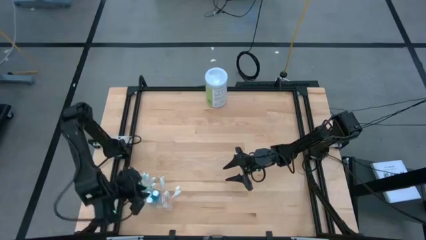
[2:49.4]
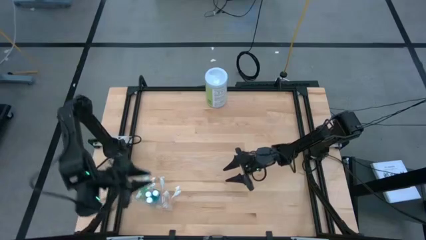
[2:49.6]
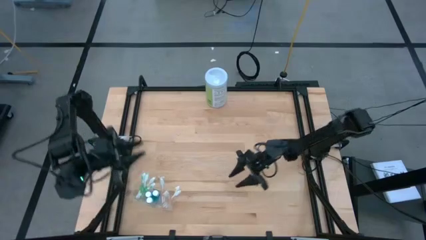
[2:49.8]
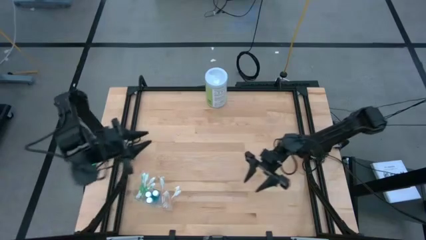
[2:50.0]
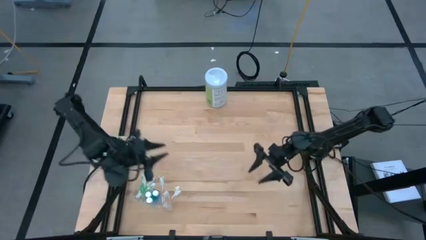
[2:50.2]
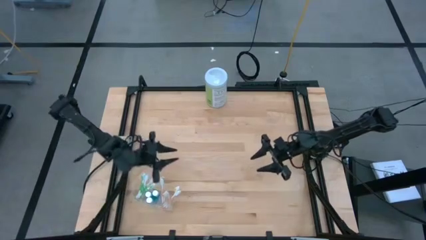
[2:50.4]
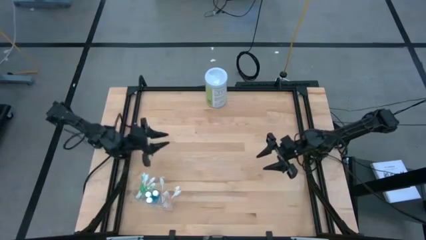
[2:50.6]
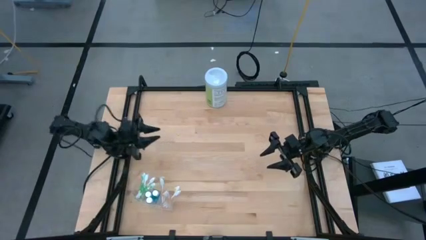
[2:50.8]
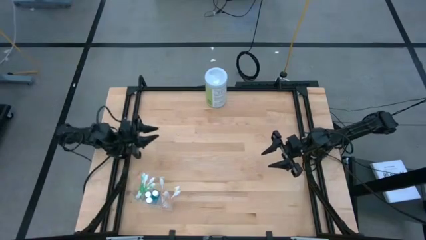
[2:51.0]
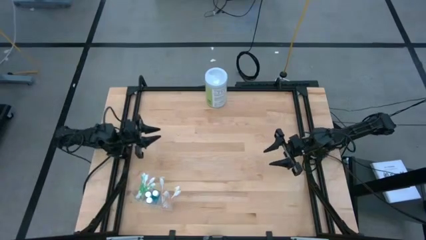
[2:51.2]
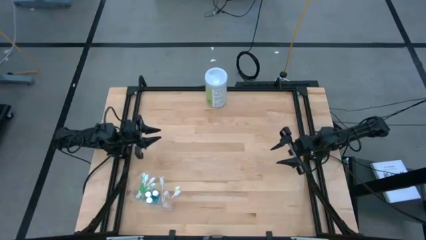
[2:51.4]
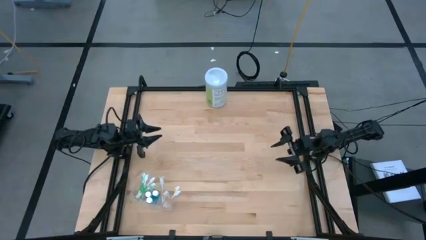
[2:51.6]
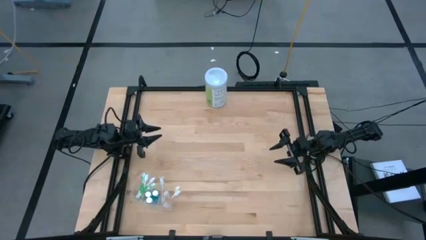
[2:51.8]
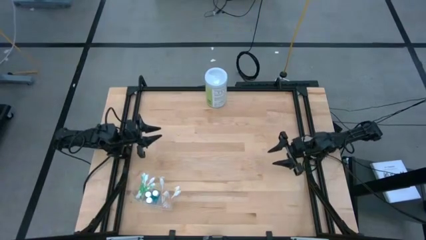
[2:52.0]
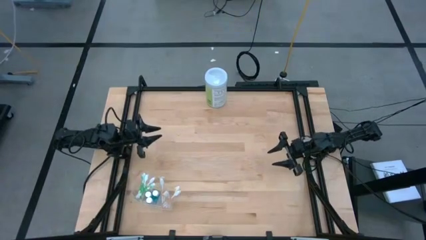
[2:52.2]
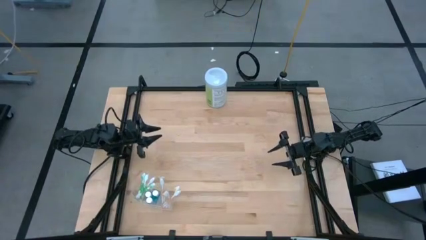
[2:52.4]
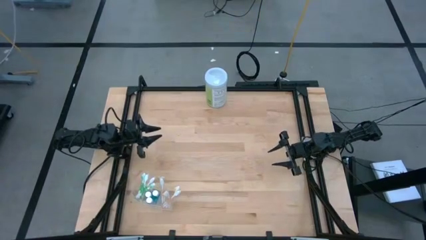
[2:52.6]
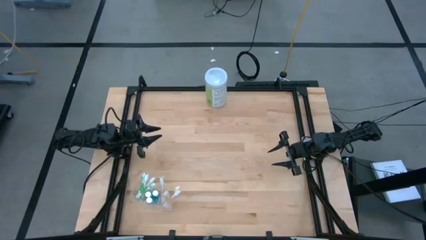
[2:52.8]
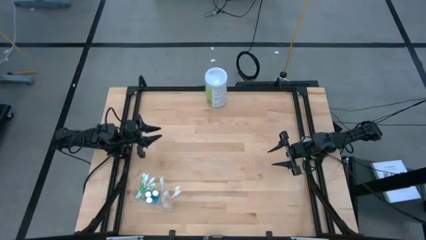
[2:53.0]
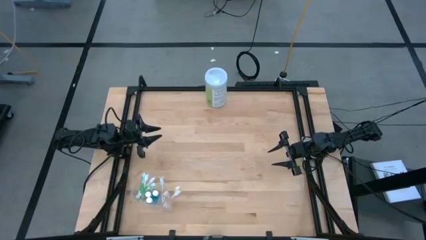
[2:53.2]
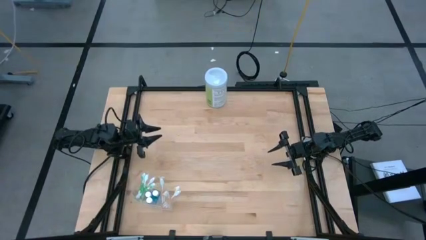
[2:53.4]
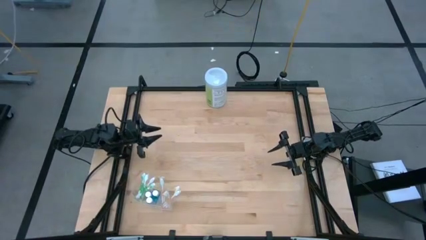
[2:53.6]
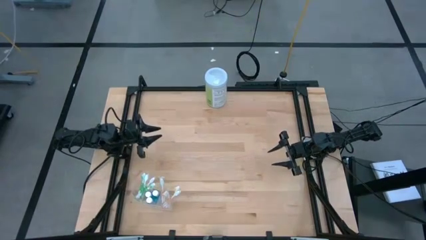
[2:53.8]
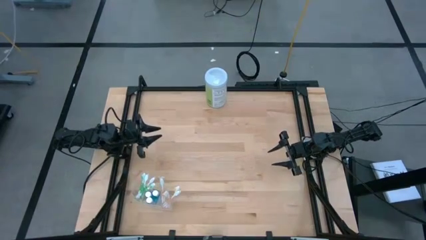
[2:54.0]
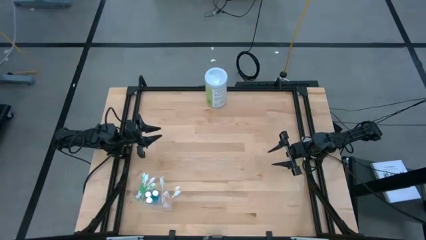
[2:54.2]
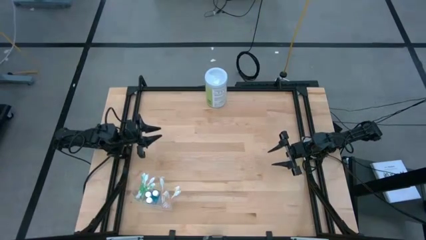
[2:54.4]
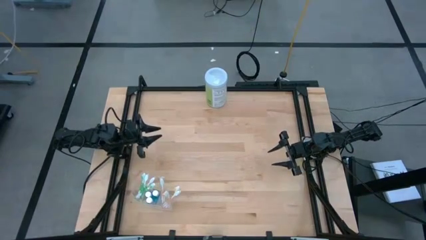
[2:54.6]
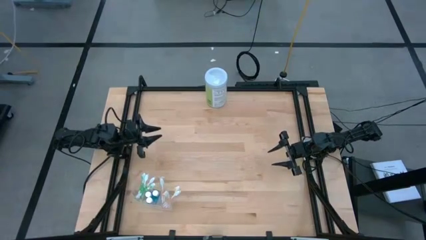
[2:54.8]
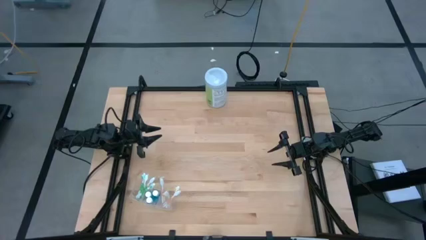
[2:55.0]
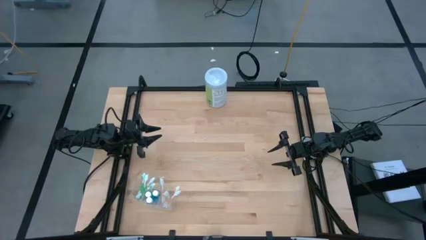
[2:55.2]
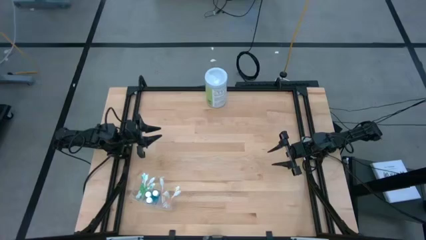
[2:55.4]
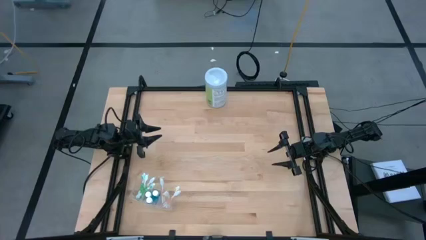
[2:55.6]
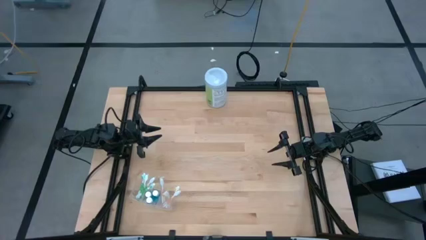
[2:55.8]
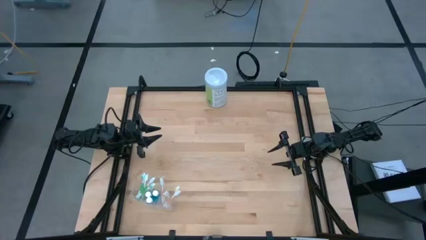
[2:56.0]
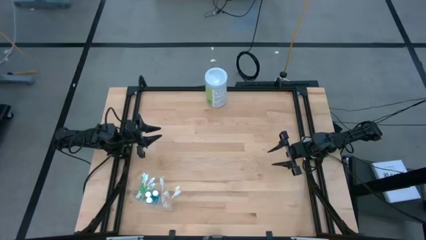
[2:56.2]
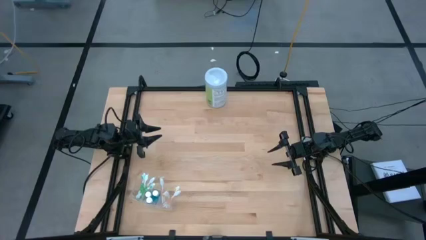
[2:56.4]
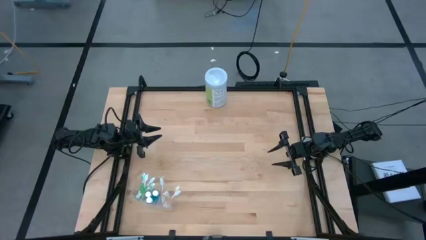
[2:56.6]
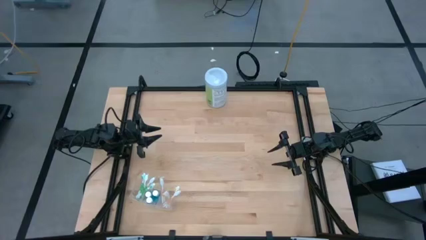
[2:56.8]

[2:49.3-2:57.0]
Task: Pick & Place toothbrushing station
Return to Home Position

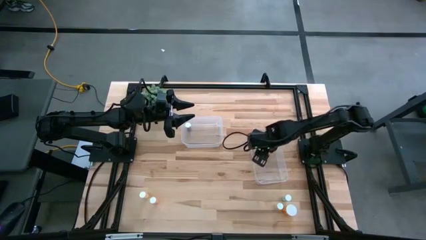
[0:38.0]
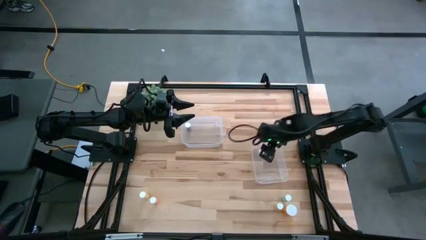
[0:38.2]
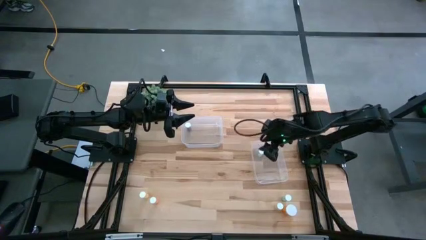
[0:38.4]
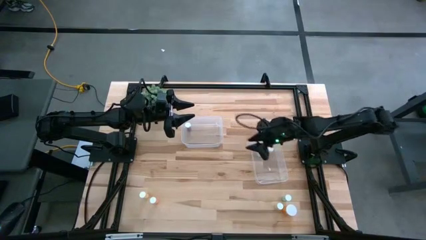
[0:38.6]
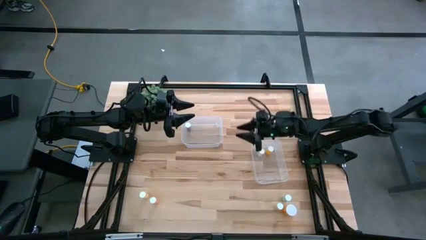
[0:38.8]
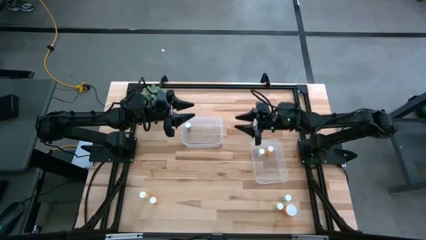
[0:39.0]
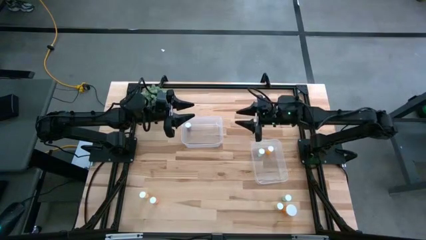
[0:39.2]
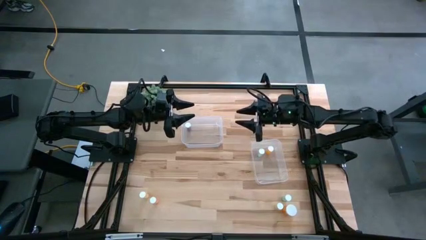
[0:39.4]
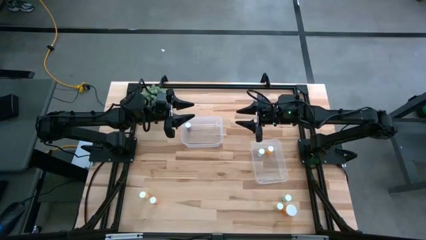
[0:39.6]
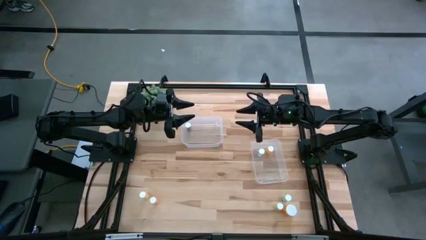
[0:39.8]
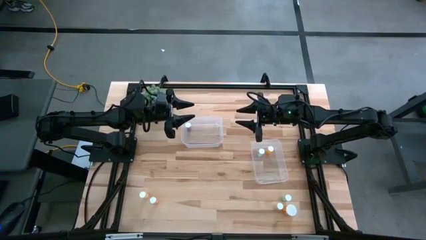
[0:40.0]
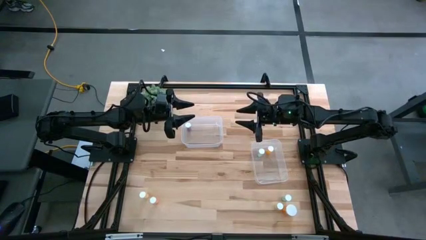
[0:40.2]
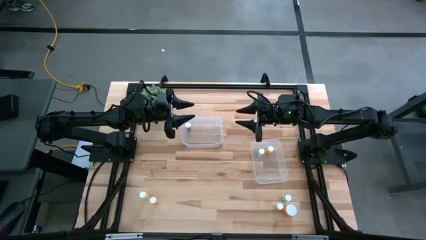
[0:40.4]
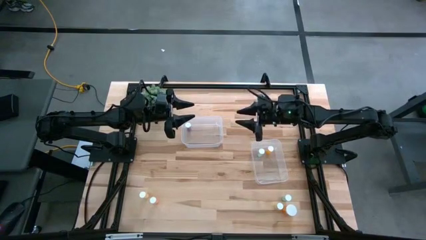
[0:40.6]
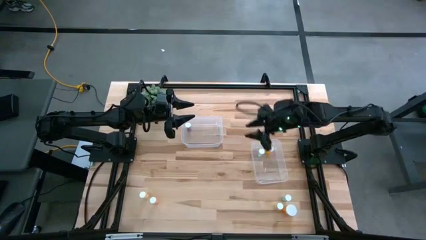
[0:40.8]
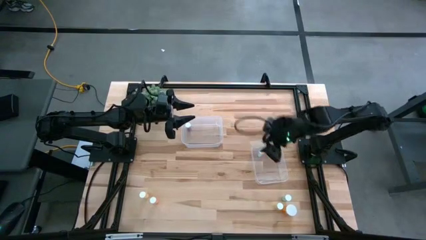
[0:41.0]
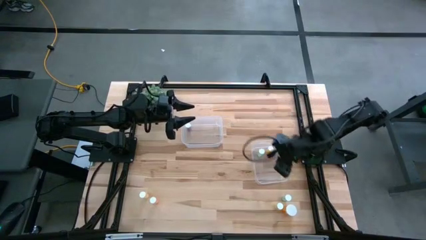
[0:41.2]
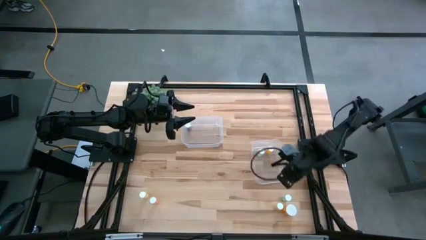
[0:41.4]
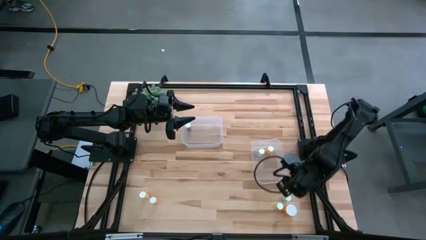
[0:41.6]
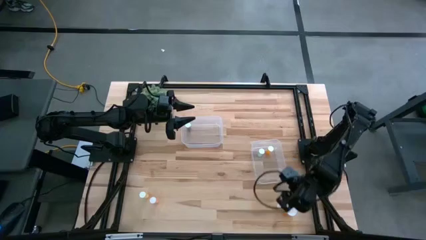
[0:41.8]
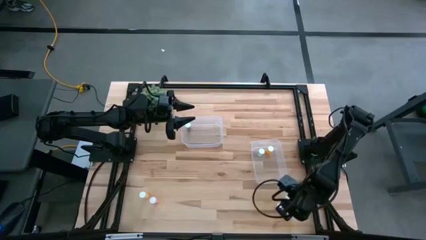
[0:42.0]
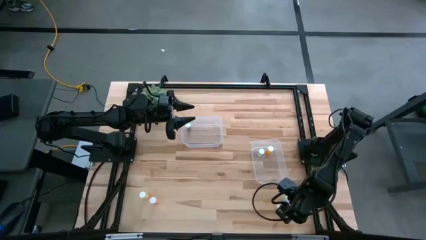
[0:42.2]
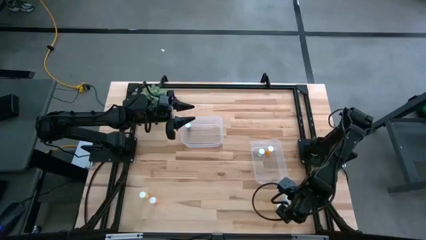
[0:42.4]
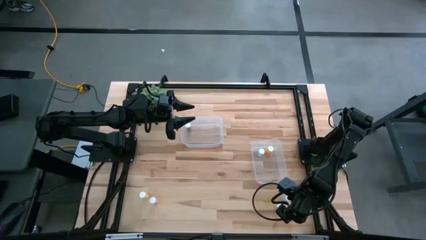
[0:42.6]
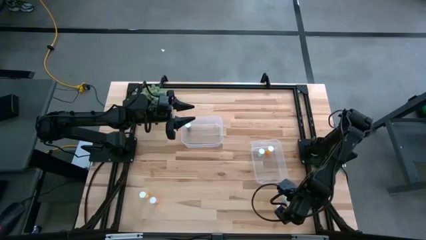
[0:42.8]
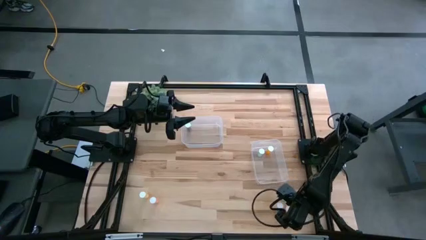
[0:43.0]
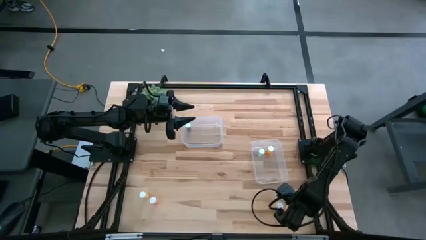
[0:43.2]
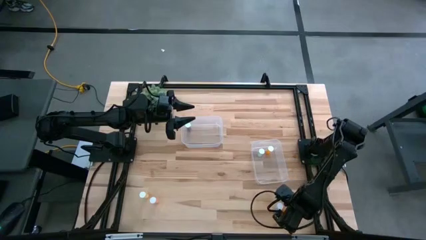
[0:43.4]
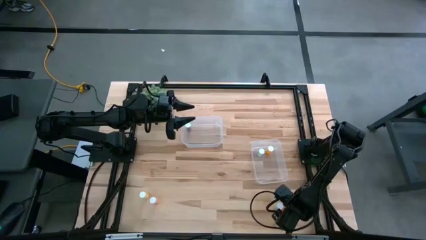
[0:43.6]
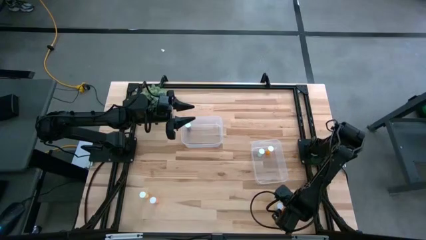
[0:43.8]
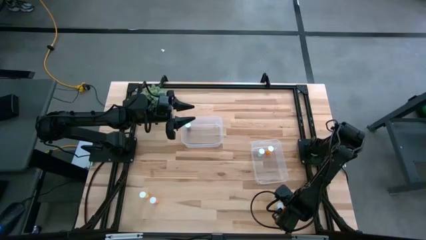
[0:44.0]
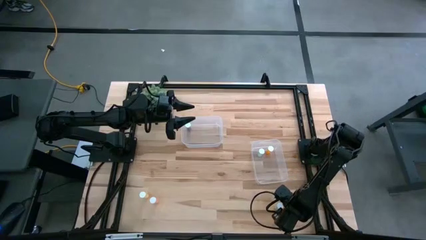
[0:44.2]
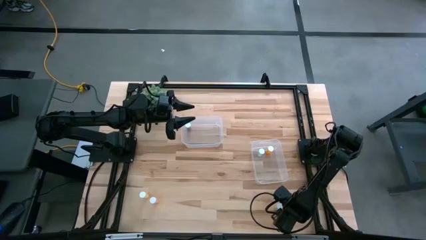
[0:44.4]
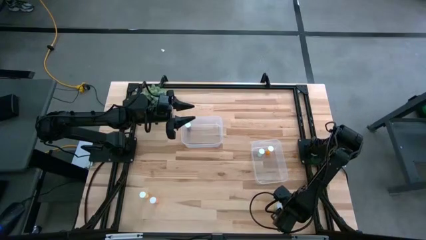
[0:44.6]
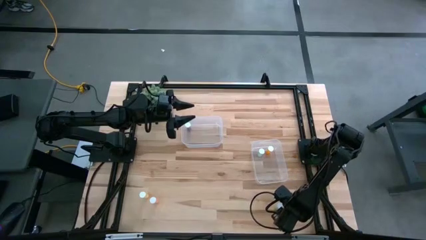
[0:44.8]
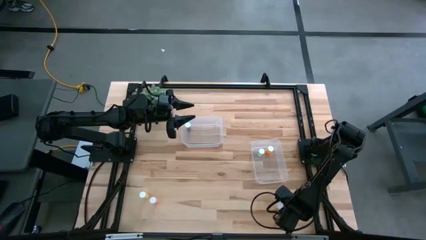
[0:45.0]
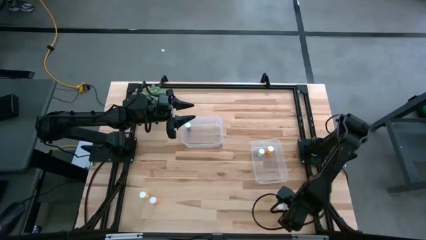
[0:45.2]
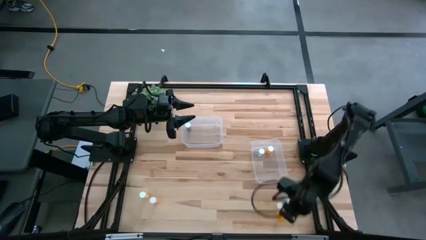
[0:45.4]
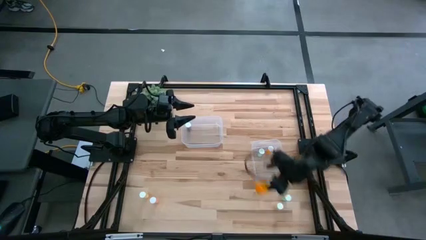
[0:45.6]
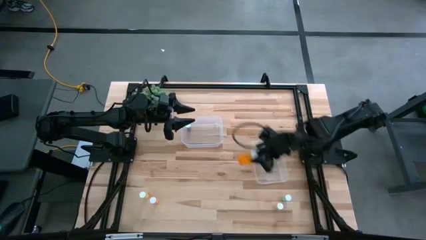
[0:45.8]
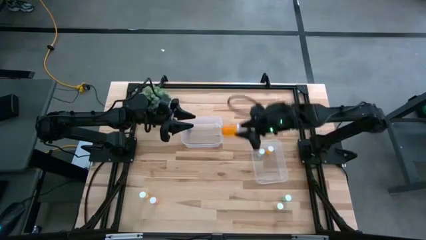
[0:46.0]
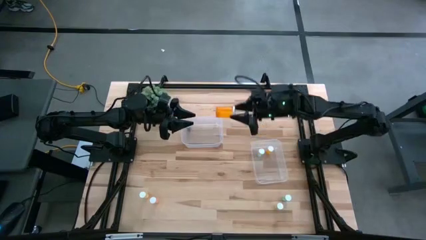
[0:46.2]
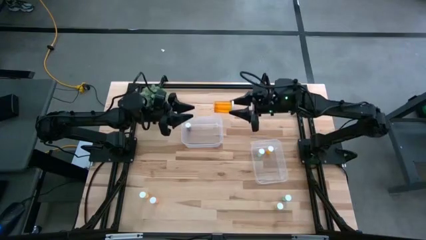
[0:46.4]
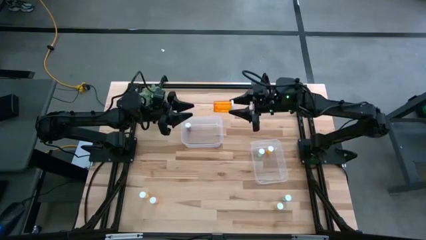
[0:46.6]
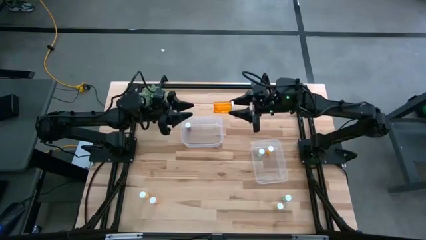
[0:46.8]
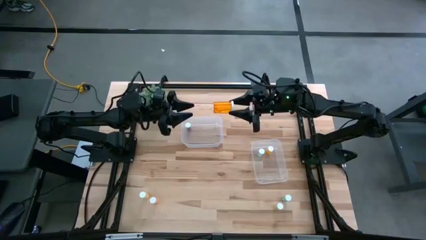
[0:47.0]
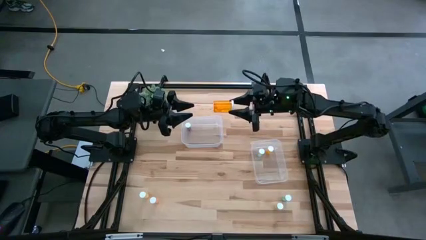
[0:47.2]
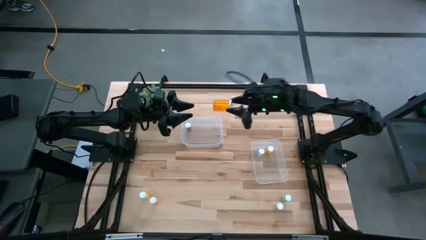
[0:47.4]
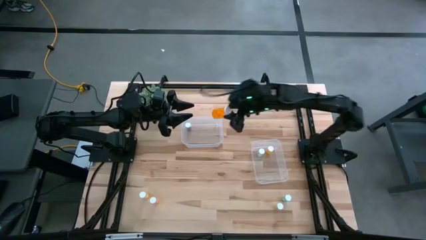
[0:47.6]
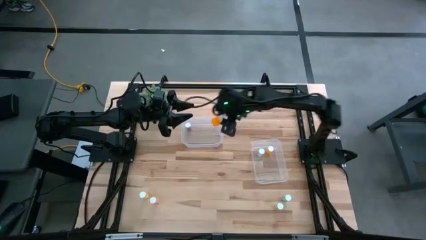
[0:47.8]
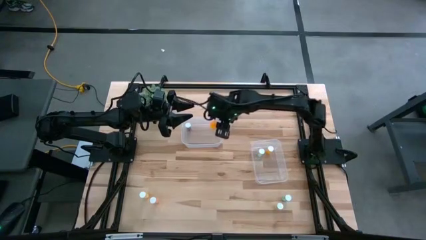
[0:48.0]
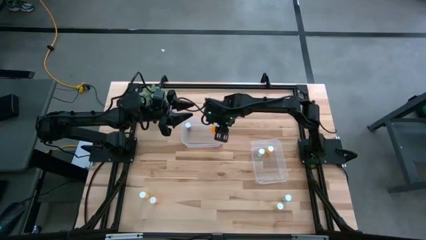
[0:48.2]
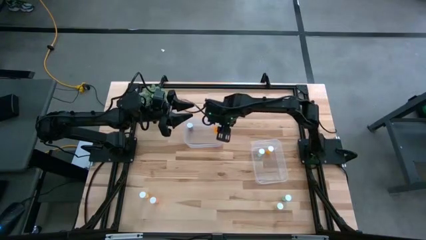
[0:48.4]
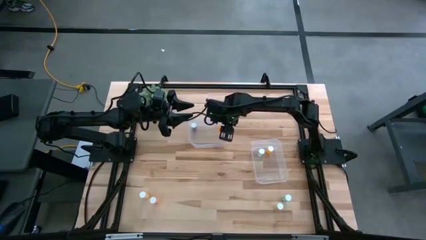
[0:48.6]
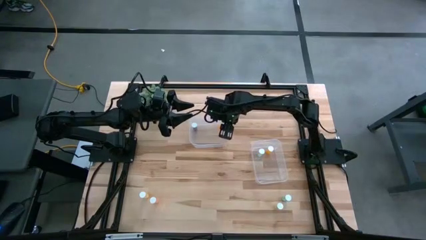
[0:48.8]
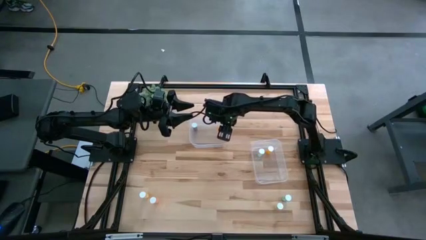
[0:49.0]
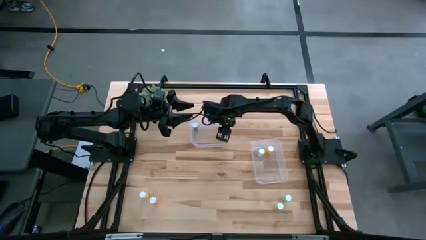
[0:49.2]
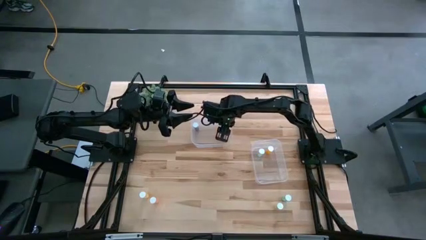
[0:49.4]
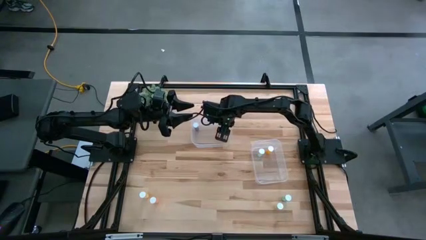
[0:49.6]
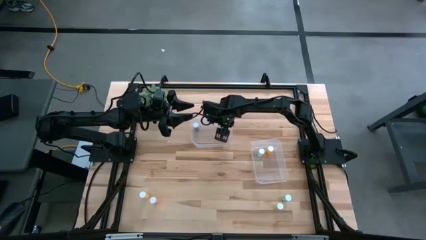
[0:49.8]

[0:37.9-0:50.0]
Task: Pick and place medicine bottles into bin by pill shape (circle, oval)
Put the orange capsule bottle into the top transparent bin
